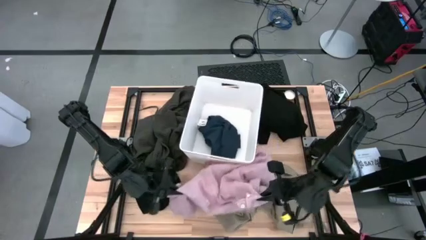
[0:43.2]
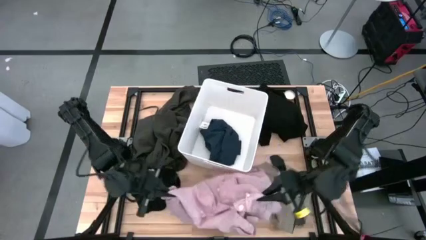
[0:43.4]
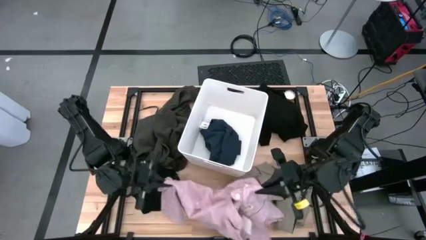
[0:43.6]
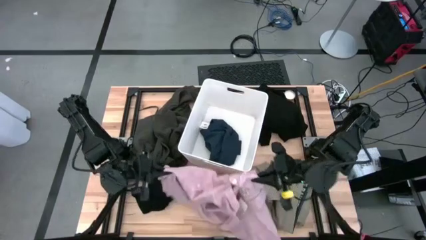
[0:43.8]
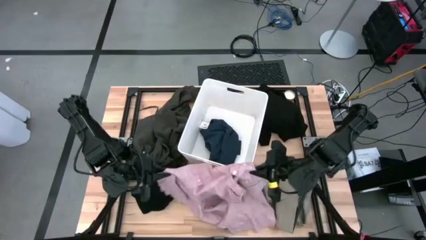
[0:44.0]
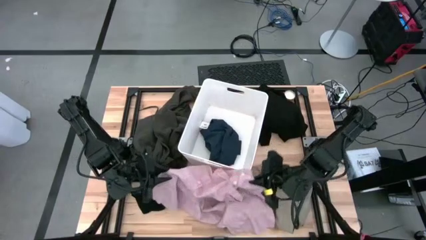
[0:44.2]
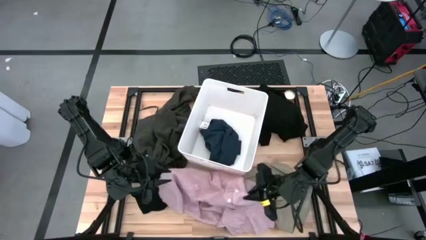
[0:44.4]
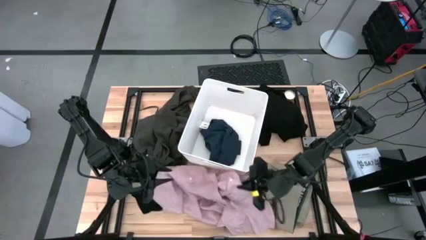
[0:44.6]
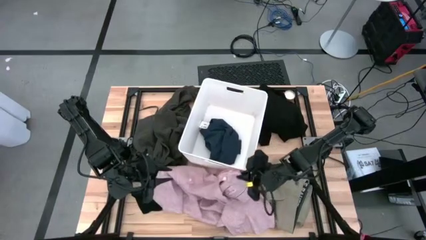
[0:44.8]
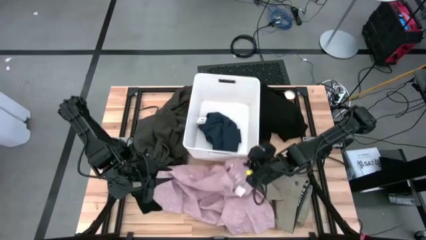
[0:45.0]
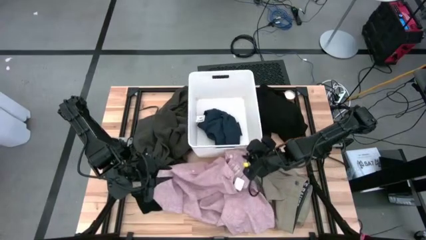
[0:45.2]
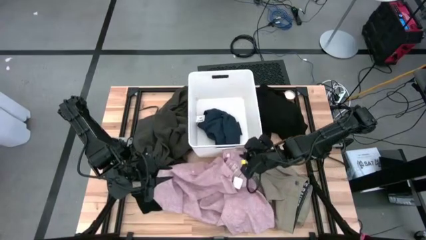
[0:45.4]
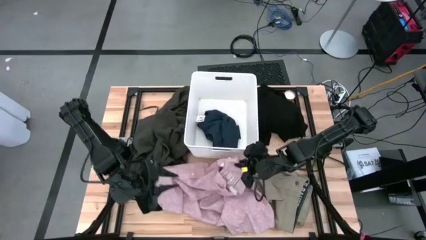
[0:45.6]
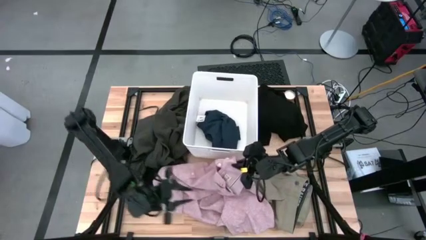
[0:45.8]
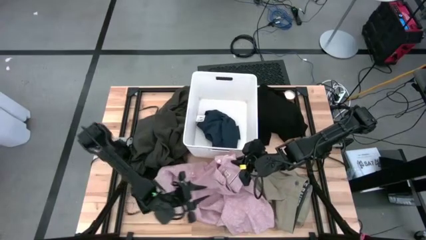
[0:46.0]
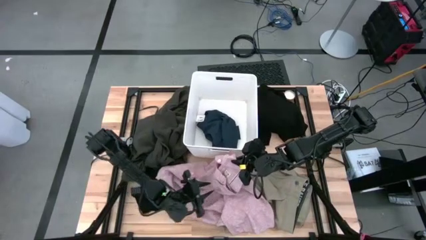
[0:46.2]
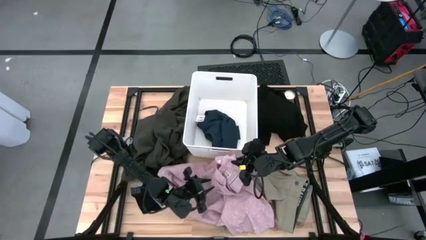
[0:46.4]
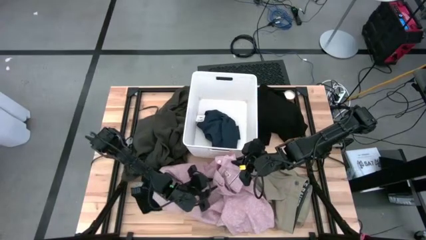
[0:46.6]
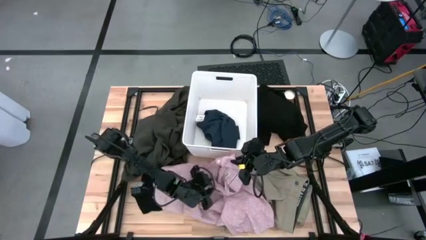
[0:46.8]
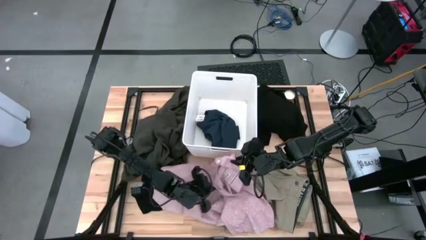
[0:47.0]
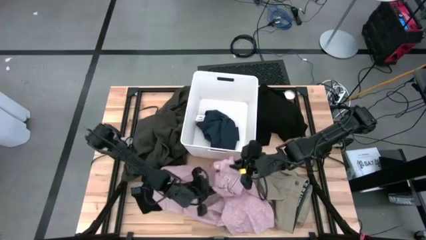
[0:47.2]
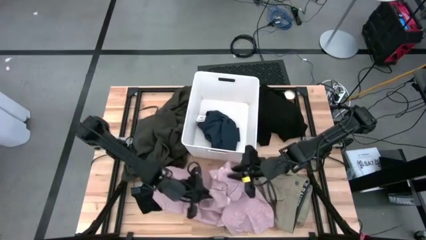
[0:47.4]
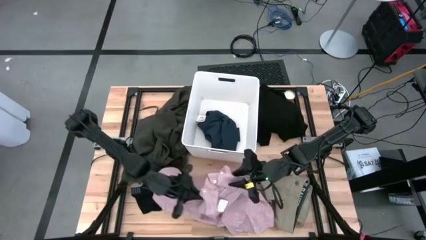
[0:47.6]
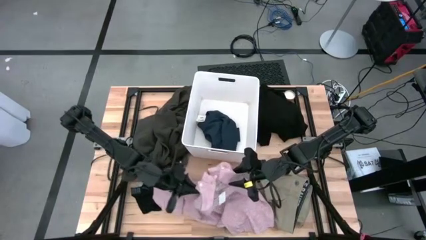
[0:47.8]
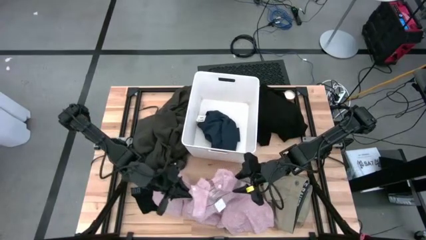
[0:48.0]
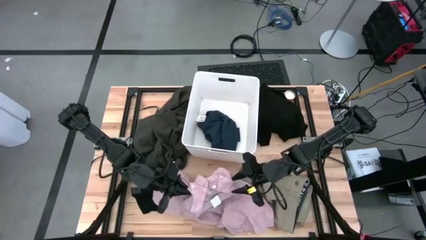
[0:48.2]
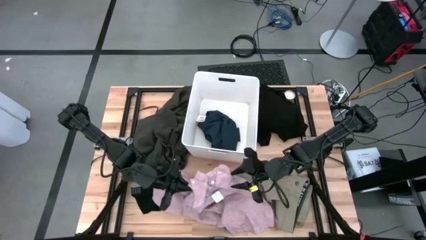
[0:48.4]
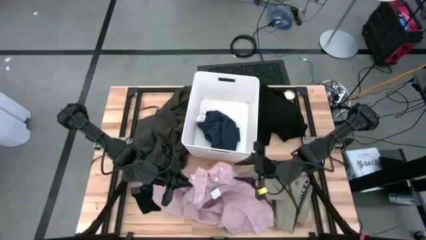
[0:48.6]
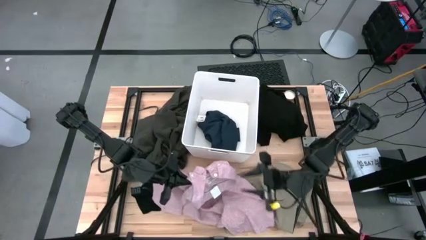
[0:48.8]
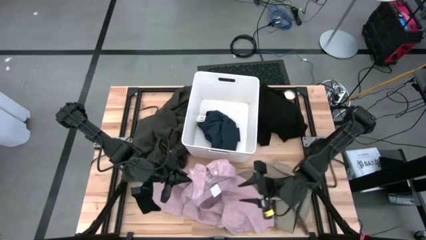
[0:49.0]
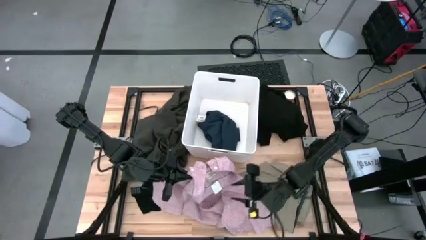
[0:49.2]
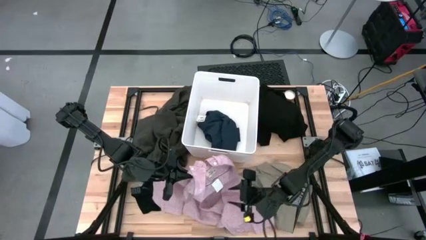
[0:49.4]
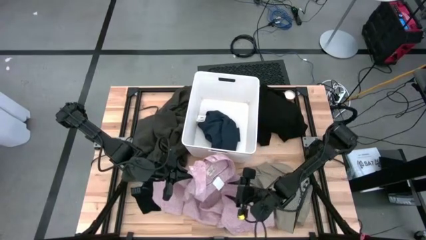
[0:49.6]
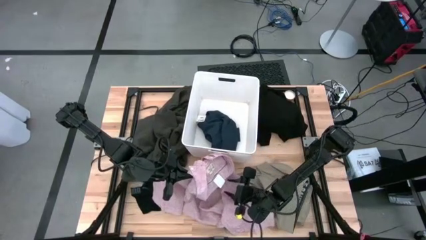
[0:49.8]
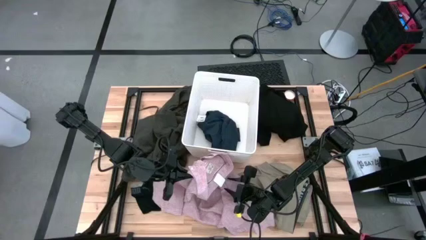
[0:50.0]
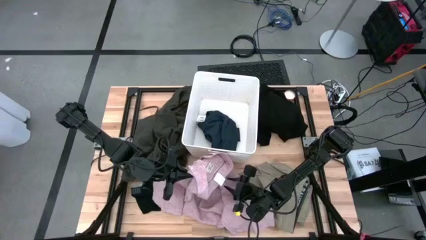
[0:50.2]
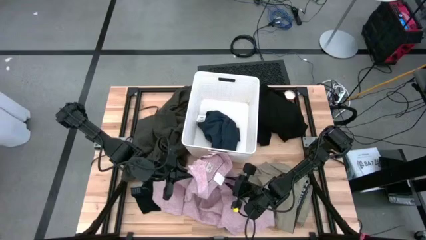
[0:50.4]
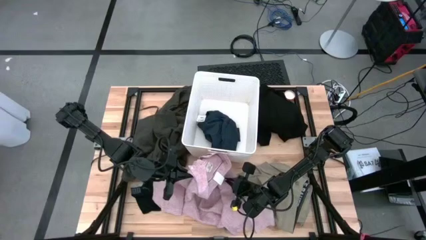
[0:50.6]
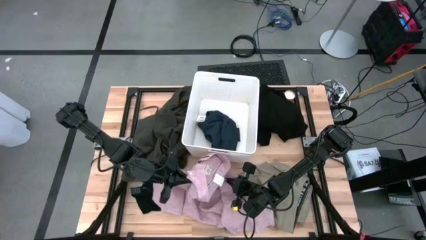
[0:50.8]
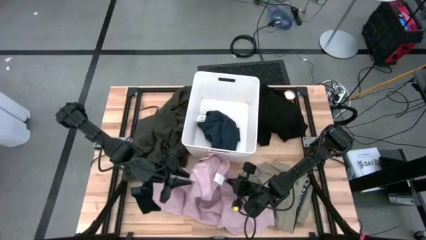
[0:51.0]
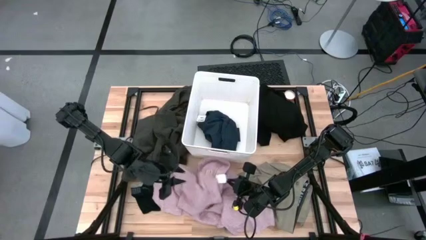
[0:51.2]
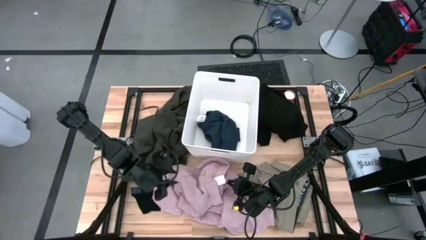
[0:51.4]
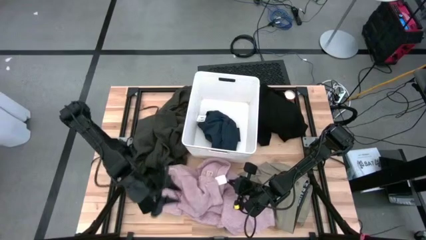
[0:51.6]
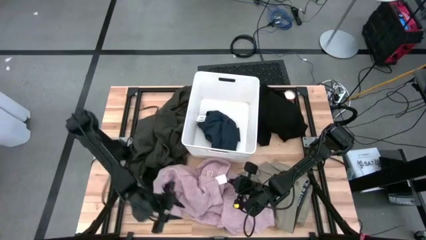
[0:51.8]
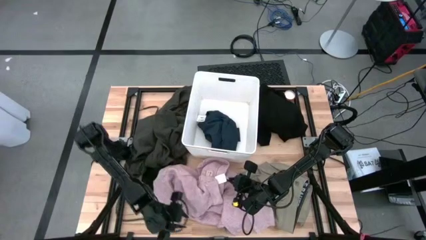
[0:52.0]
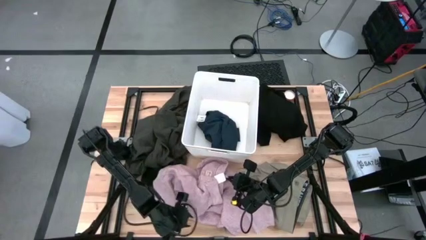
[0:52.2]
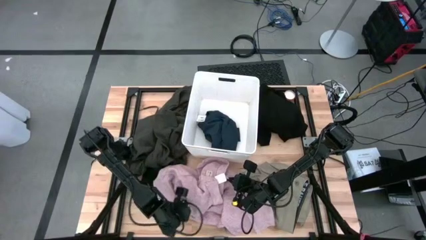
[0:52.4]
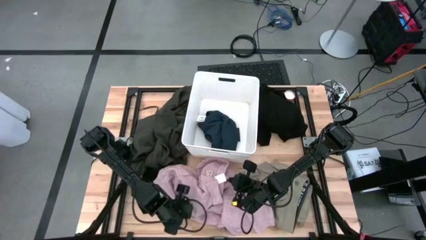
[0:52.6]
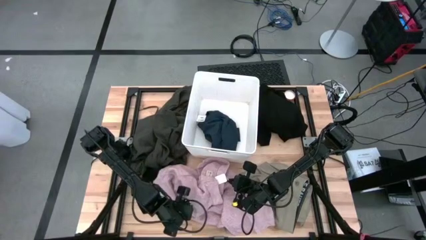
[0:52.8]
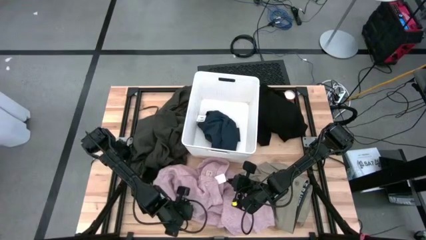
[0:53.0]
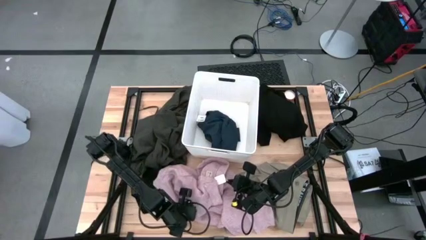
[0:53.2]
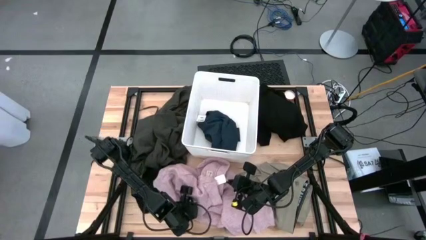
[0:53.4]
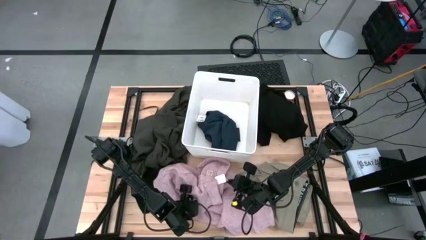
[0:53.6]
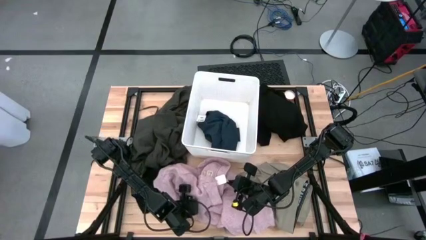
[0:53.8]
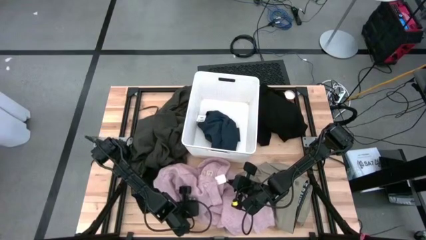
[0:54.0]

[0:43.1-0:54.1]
Task: Sort clothes
Put the pink shirt into the white laundry bin

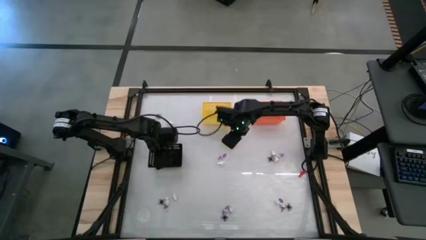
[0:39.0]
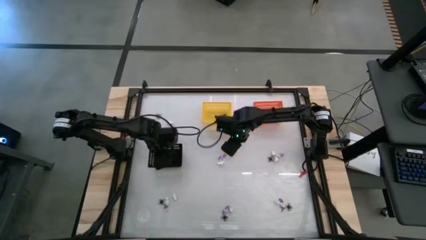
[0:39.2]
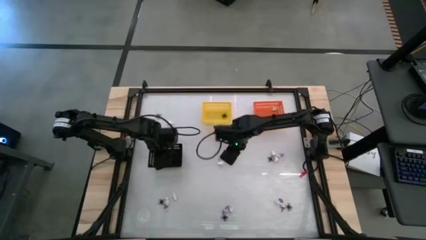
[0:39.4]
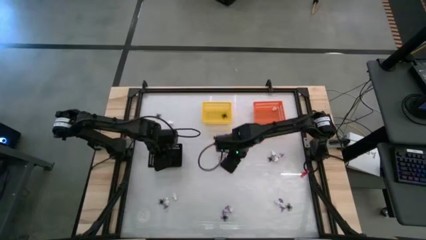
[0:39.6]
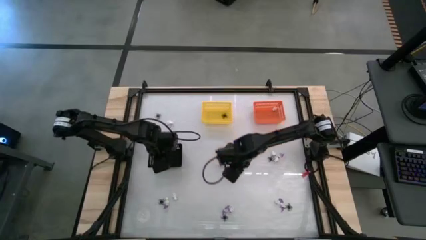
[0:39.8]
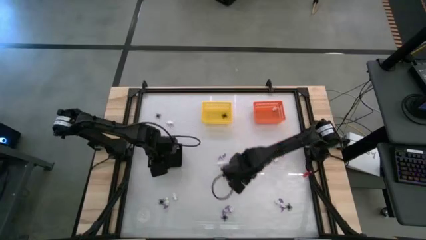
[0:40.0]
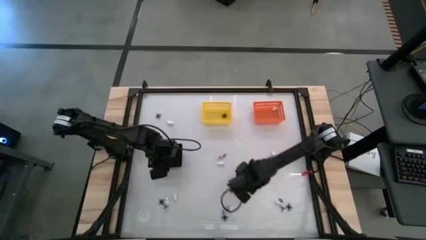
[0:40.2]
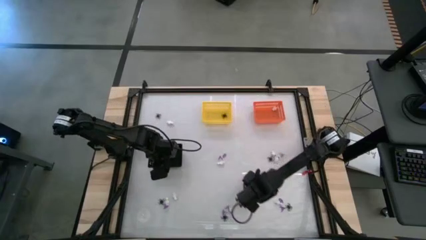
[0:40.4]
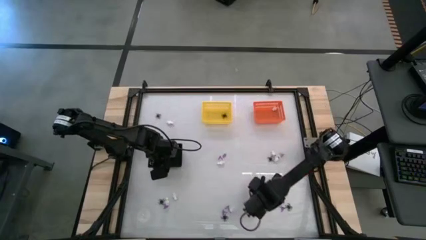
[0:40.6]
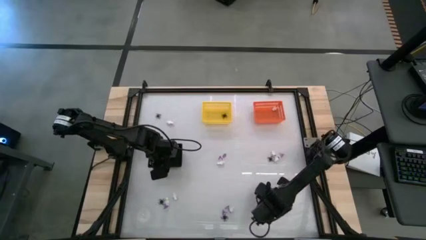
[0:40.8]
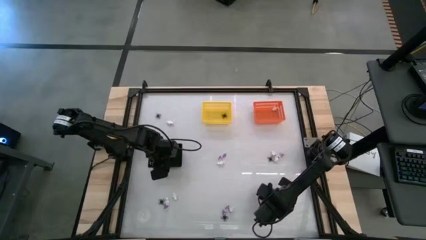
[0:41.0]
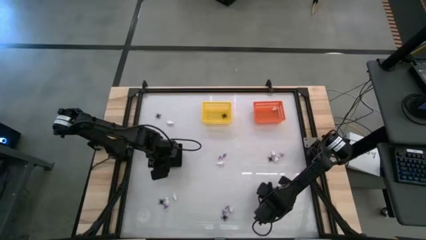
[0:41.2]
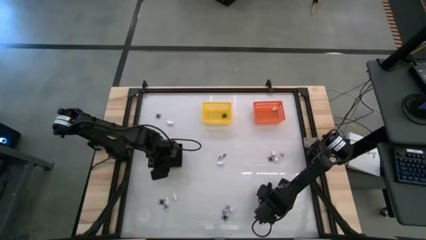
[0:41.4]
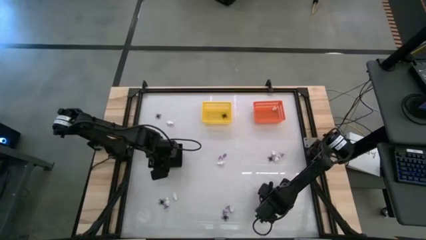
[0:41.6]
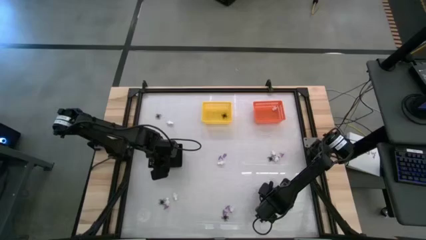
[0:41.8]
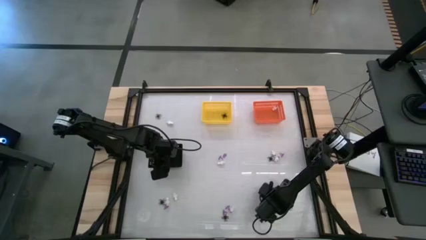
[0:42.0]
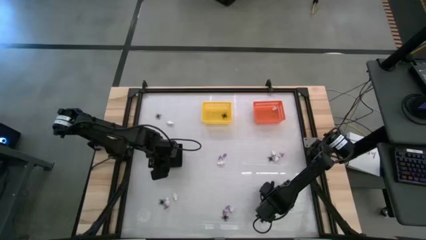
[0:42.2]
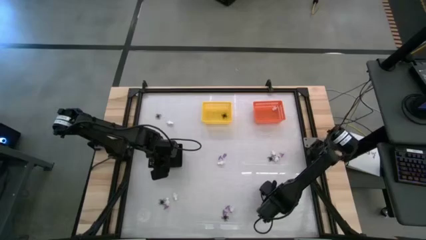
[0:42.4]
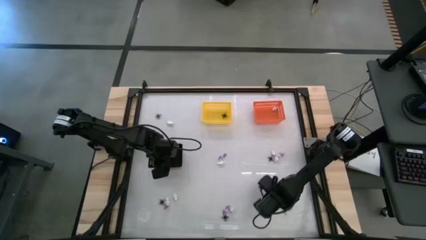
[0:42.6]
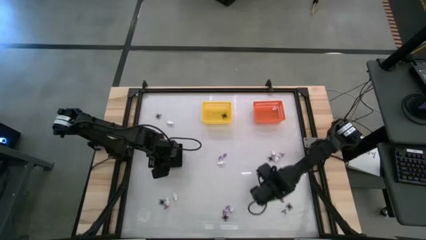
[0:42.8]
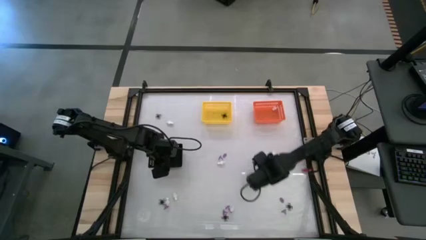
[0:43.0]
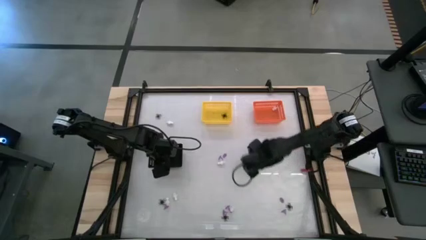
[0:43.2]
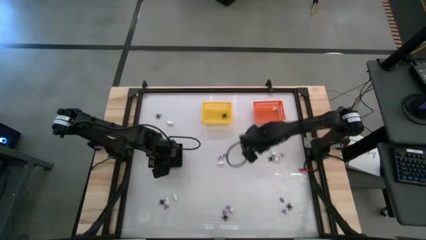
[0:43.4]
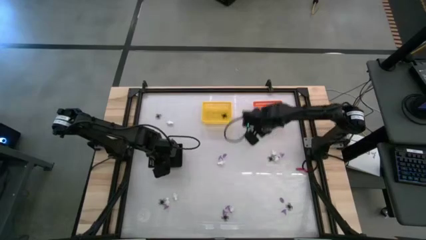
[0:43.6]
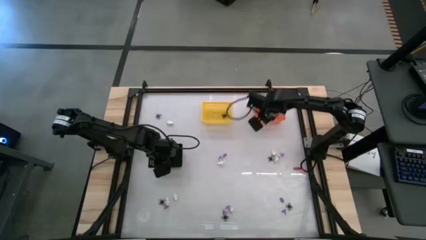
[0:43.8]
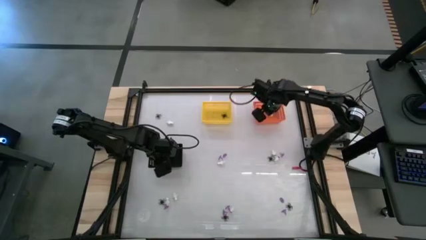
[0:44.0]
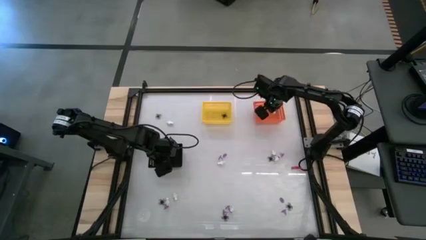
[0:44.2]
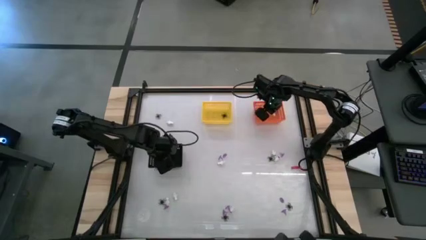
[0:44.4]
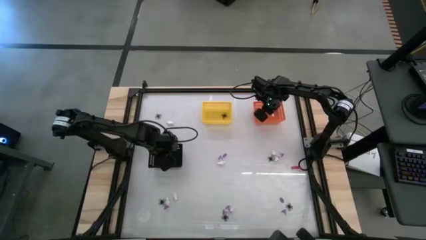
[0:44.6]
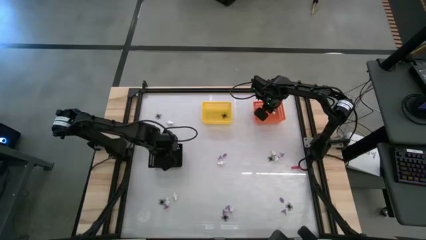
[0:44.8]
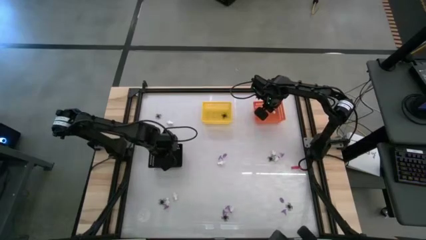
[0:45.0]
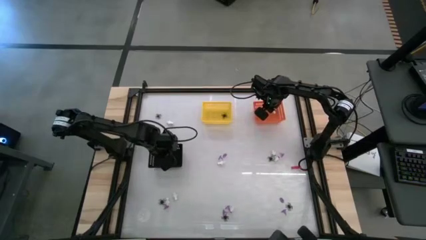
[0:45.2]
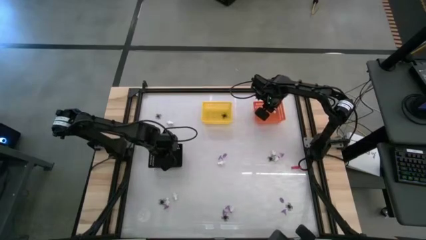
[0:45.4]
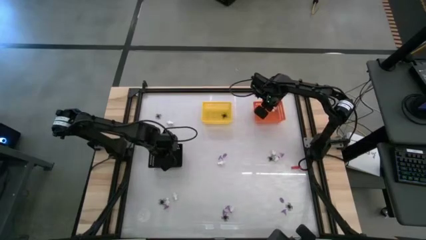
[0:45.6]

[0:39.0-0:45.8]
Task: Sort Halloween decoration
Put the white skeleton toy into the orange basket
